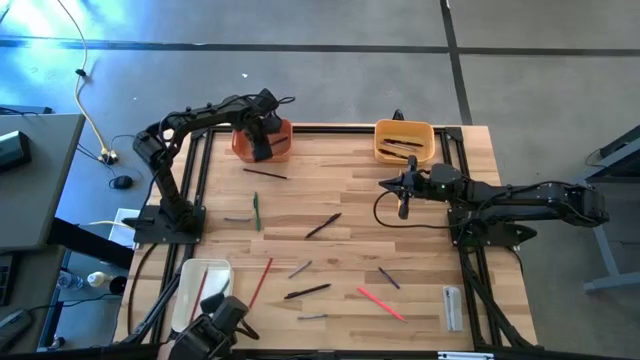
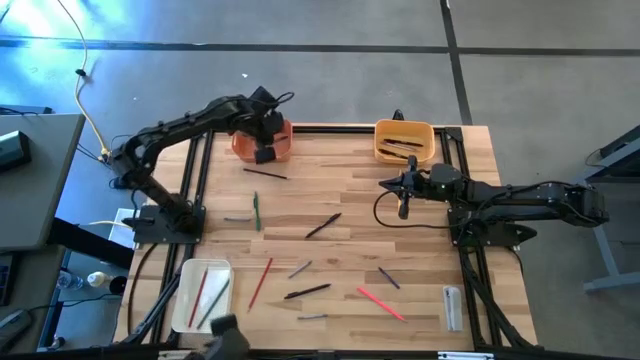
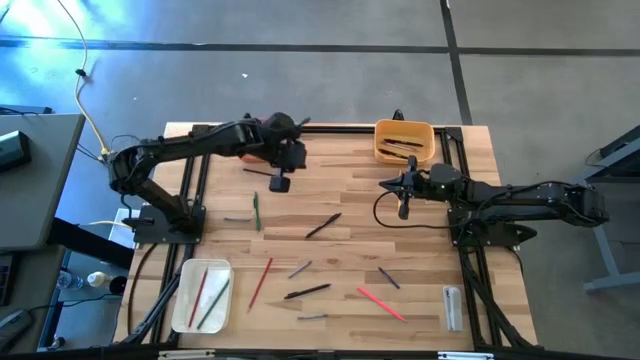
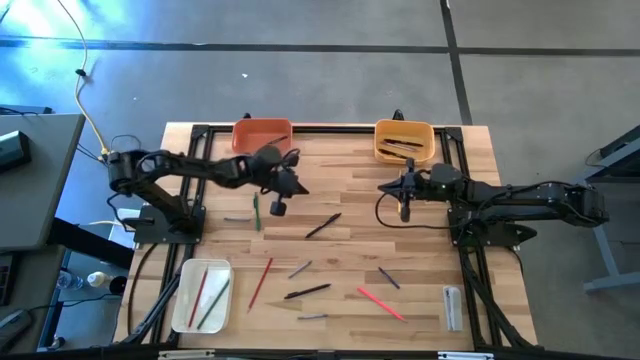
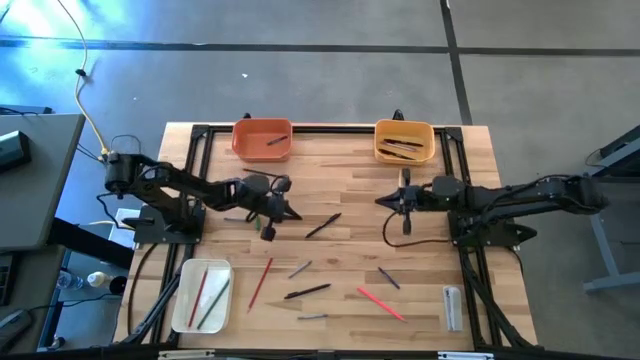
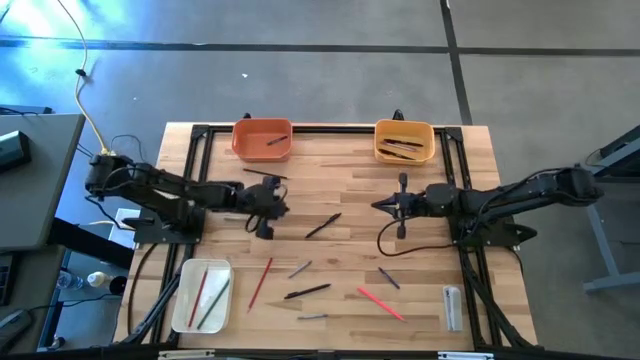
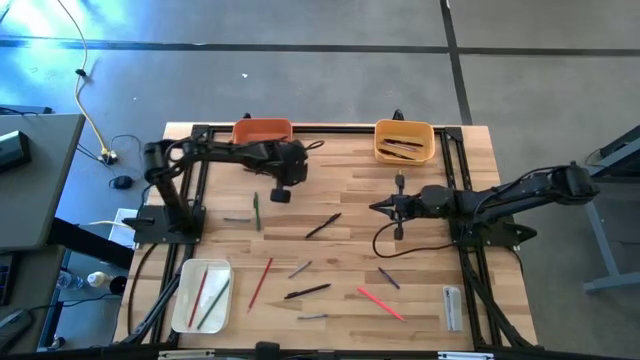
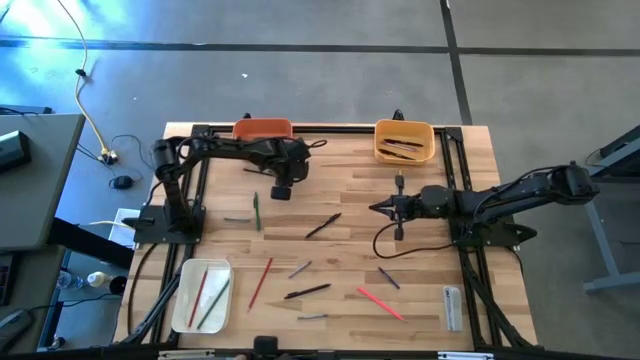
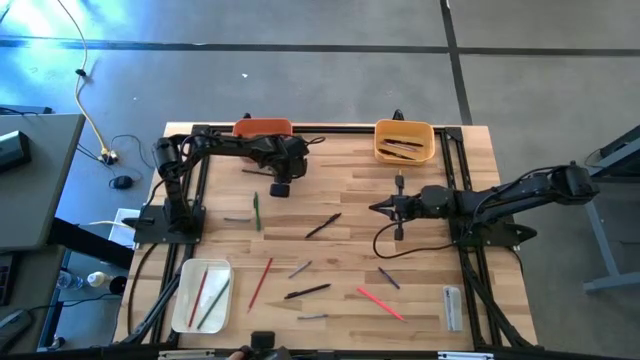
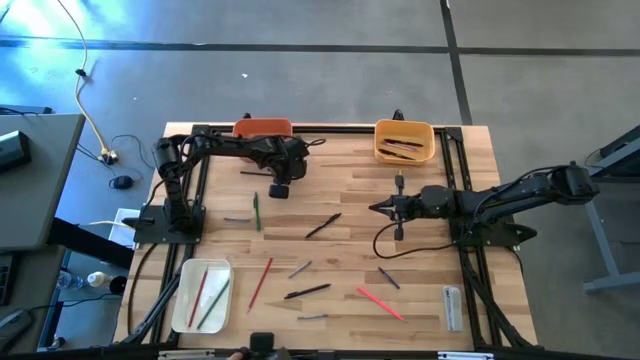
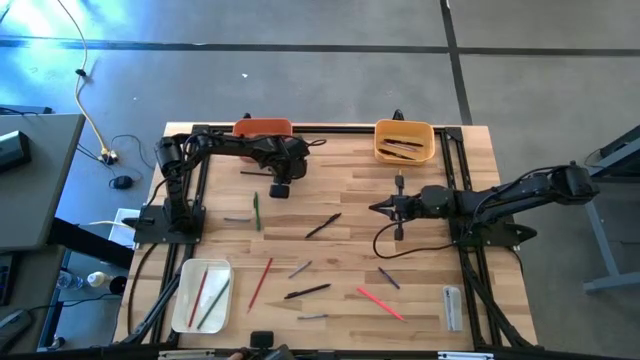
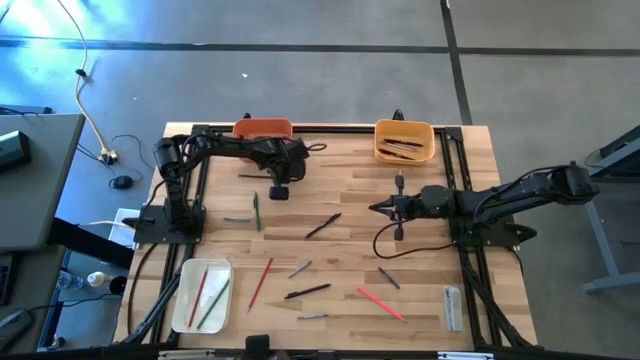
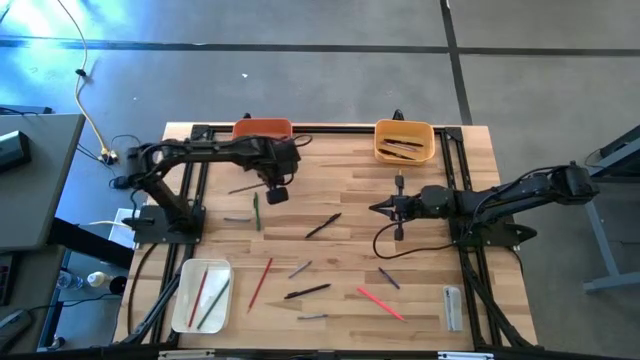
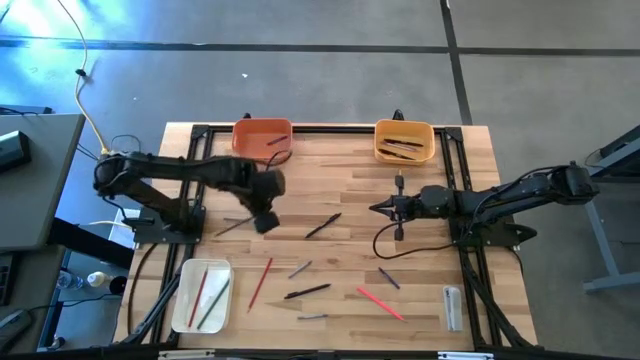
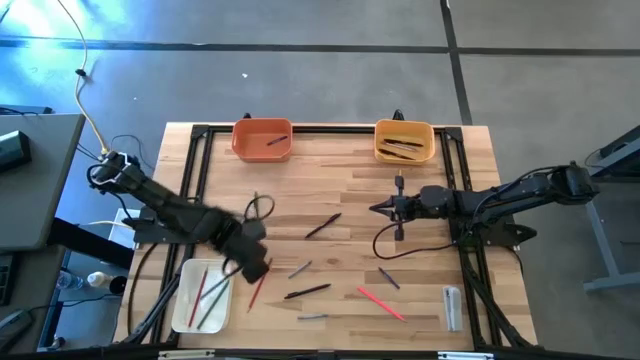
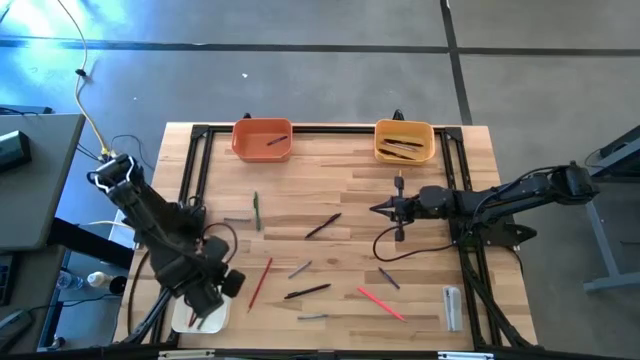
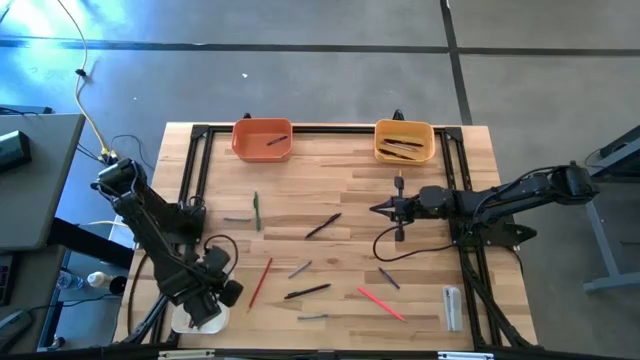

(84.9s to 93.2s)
Task: Sort crayons/erasers/pens/pencils in bins
Put the blue colored pencil into the white bin

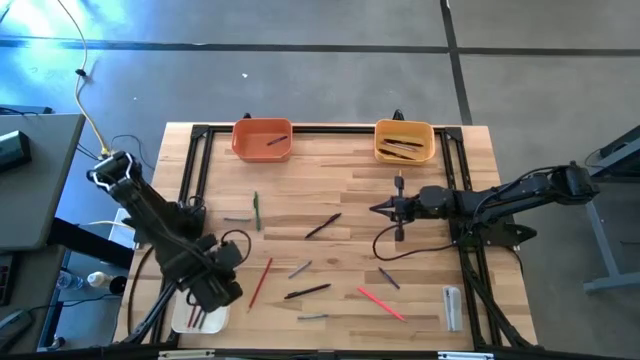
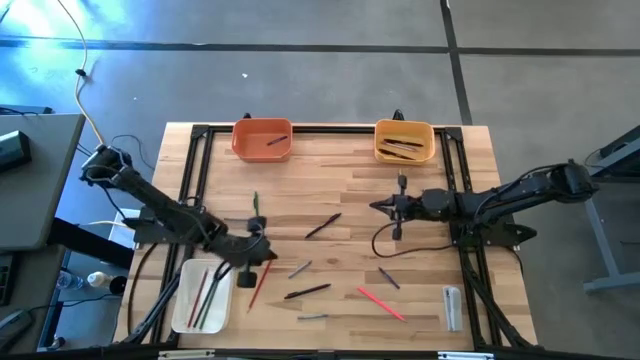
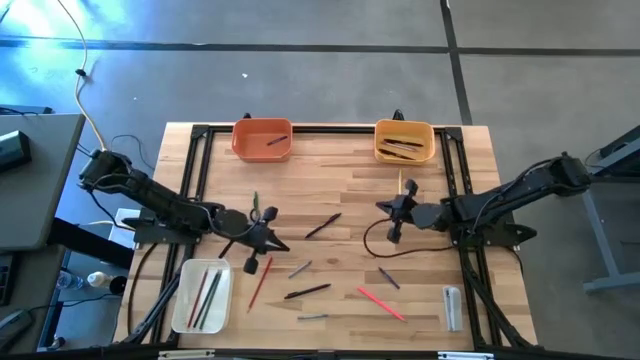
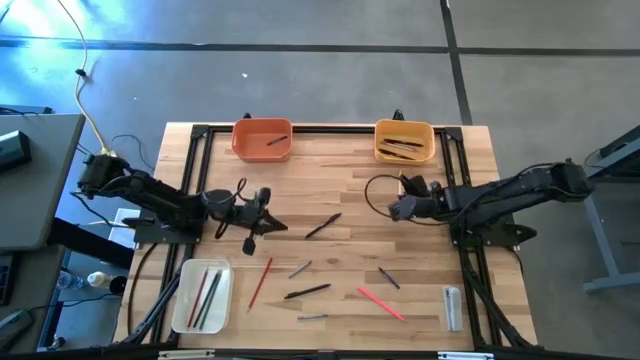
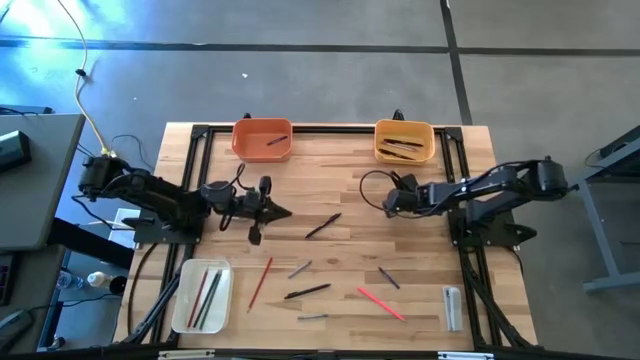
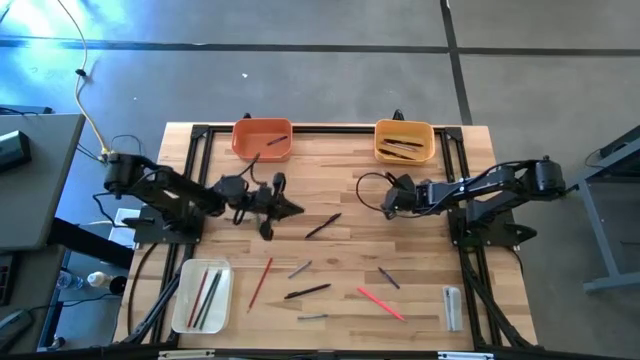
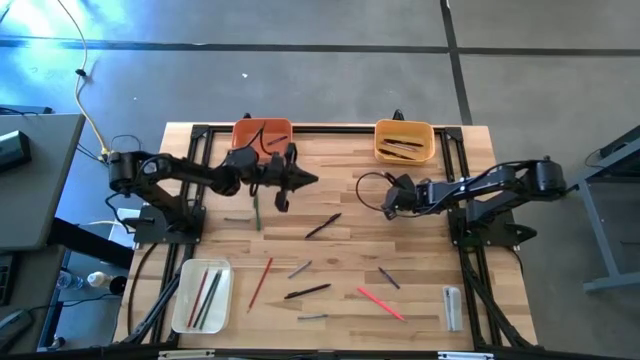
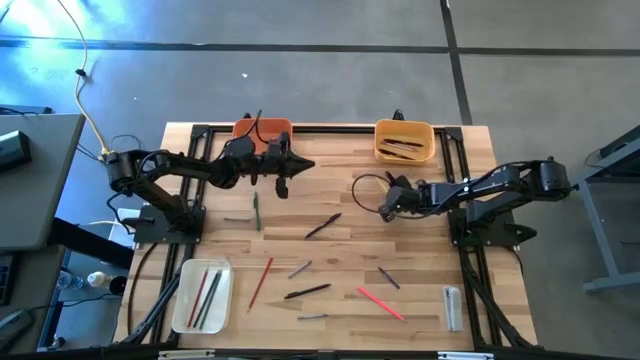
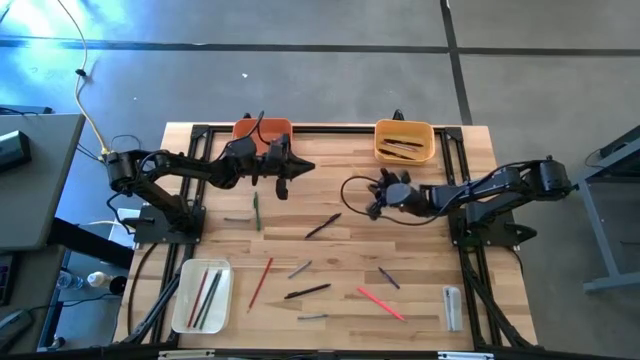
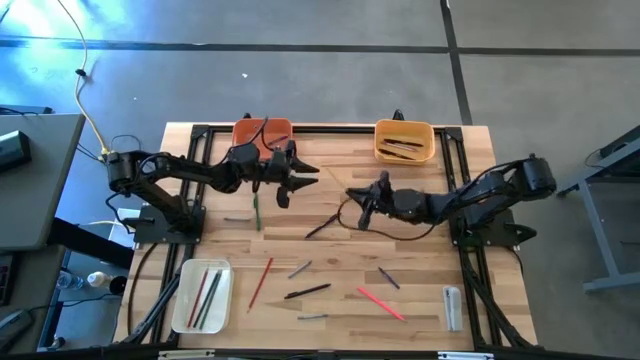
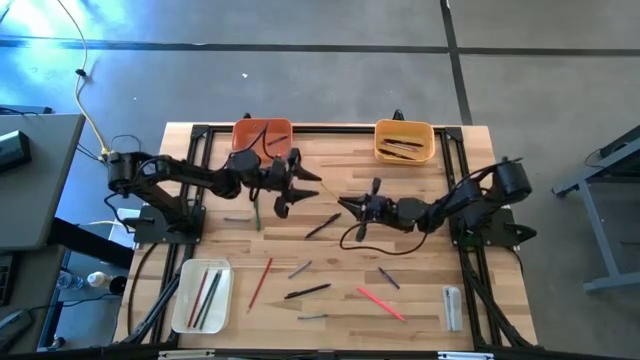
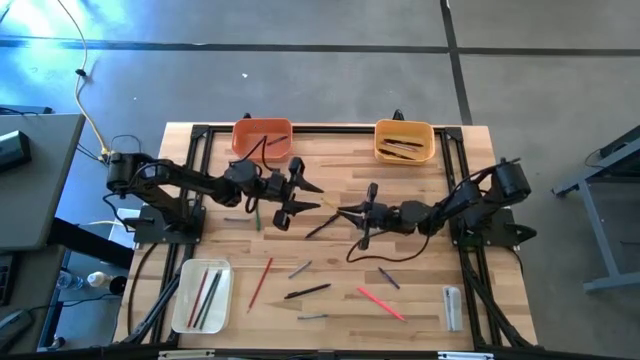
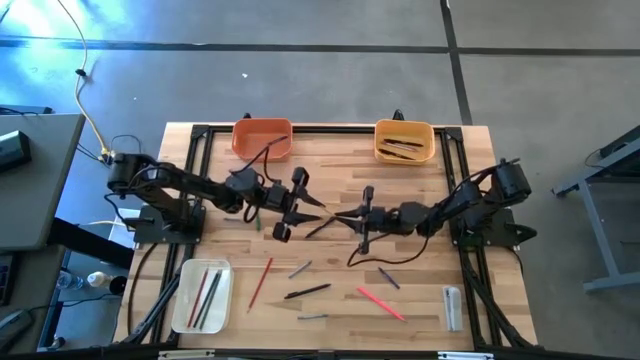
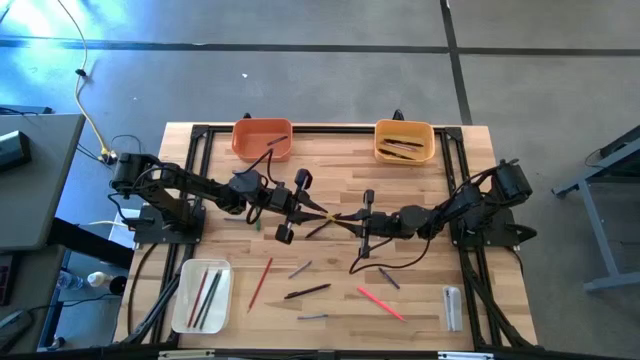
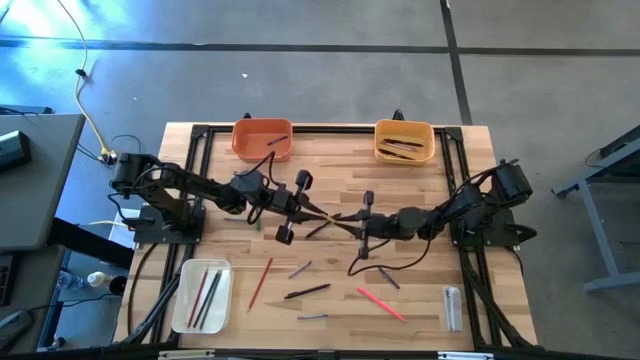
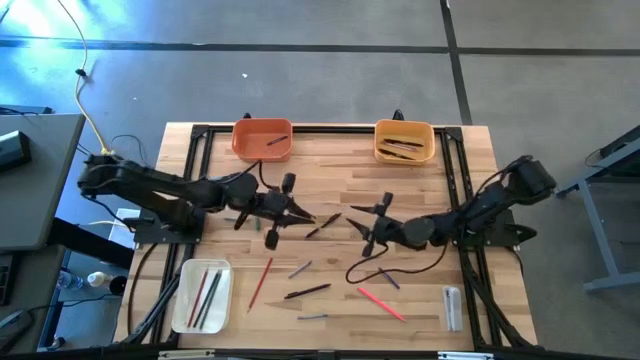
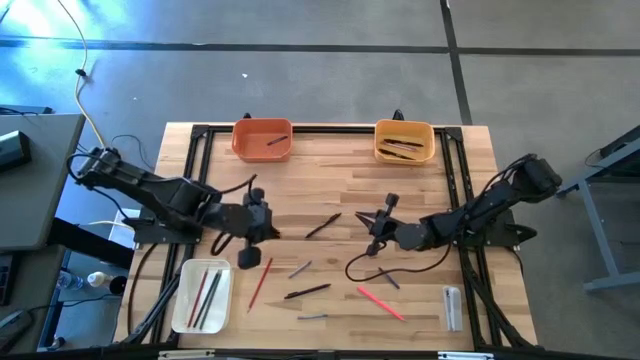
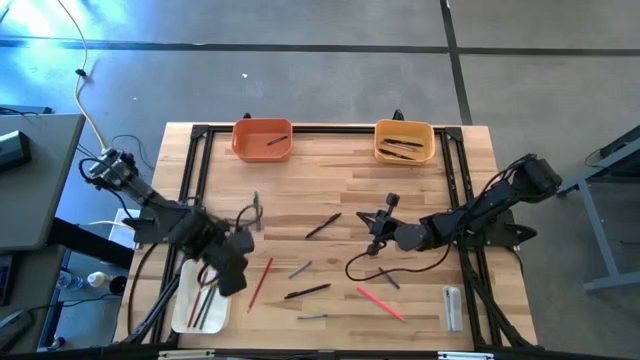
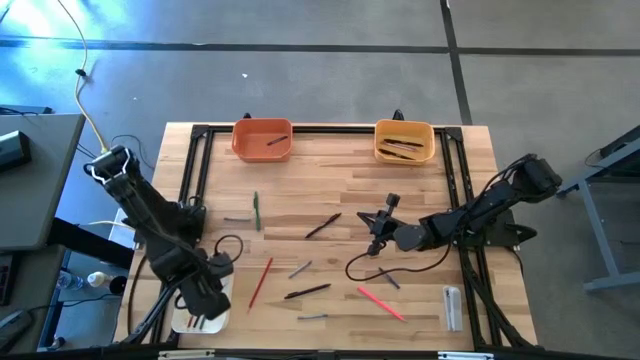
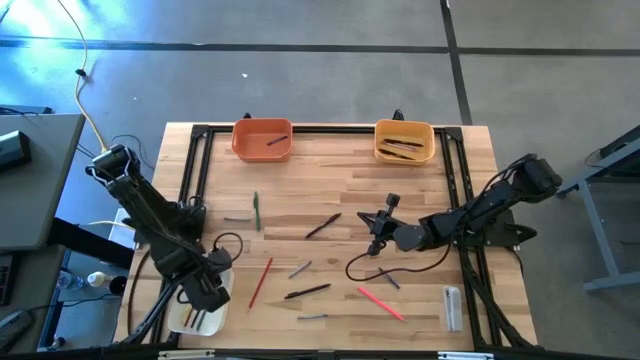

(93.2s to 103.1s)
Put the yellow colored pencil into the white bin

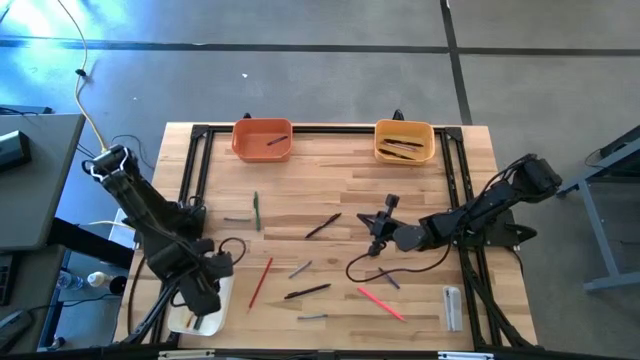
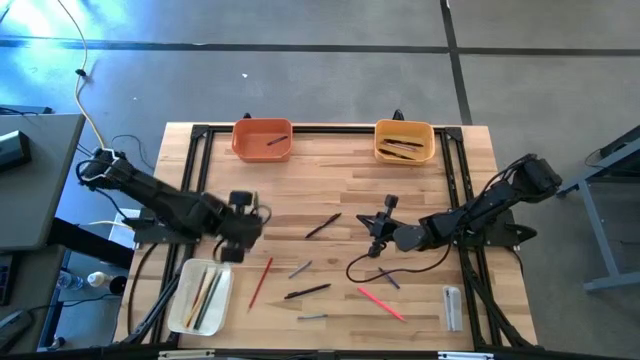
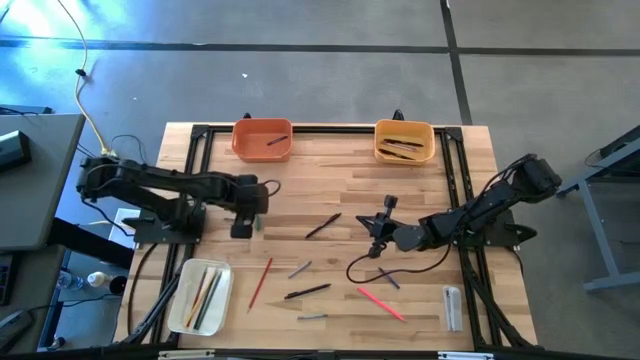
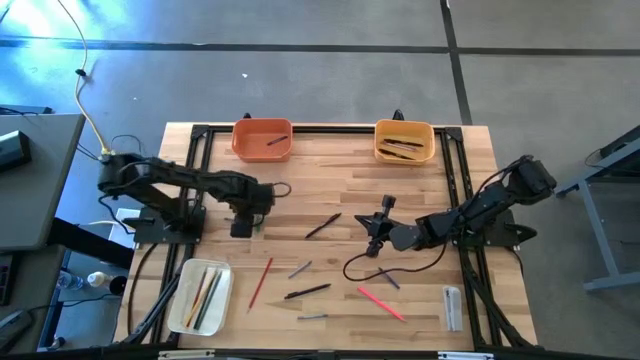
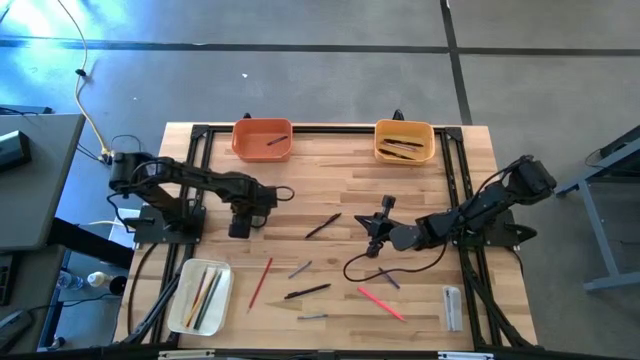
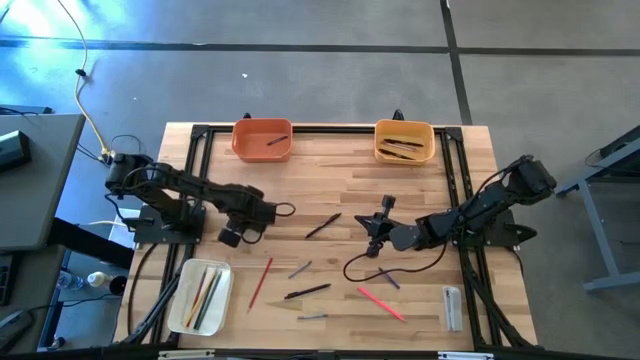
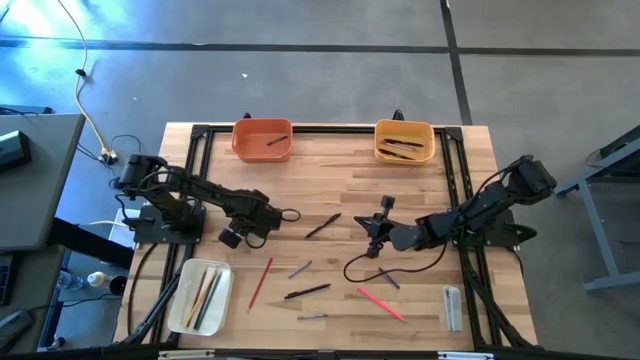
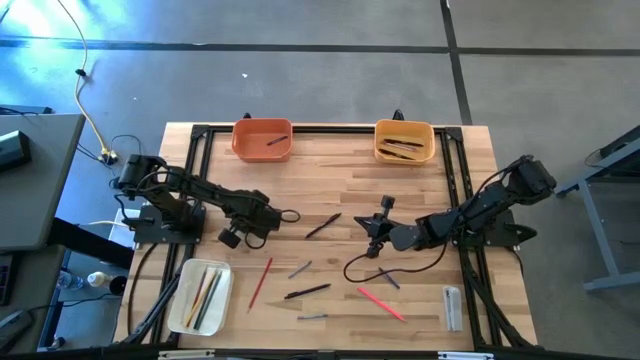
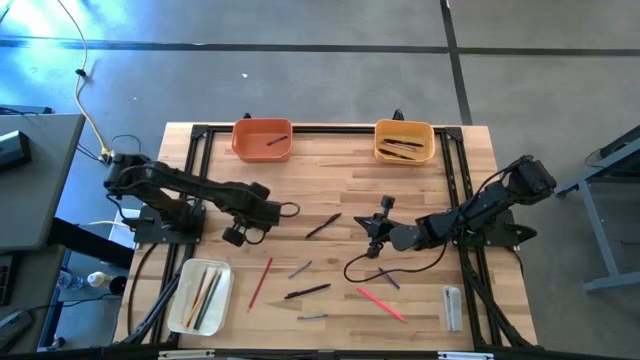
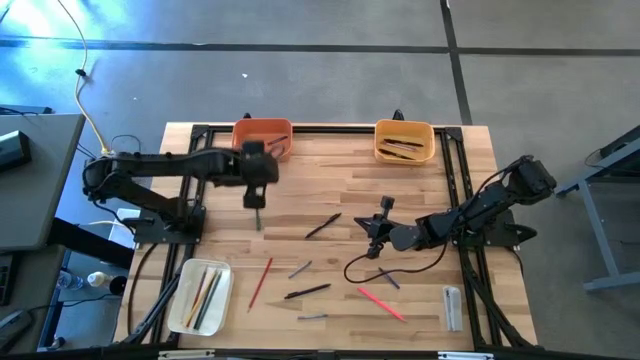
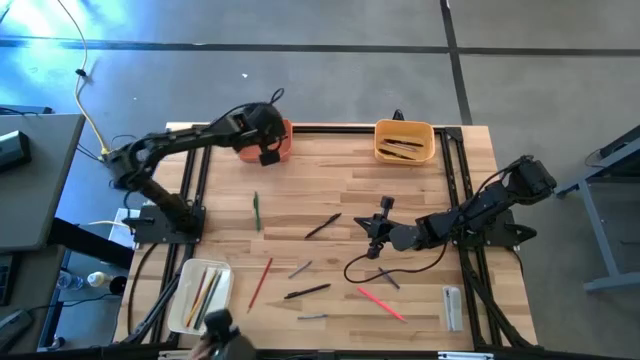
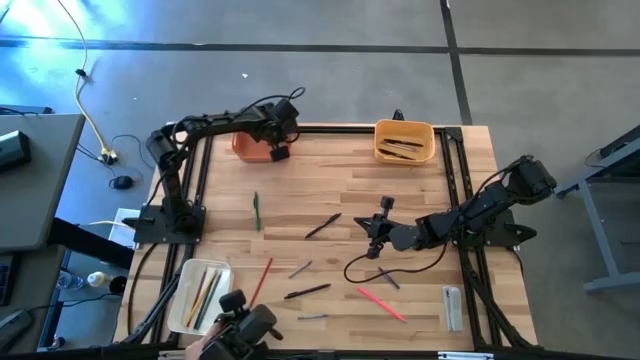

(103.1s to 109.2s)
Put the gray crayon into the orange bin
